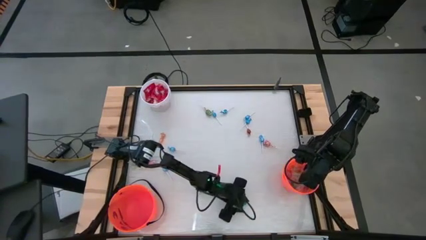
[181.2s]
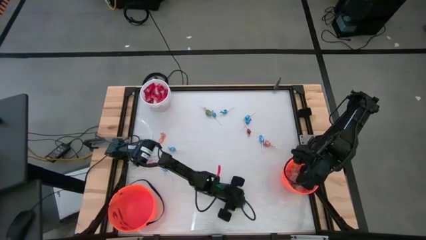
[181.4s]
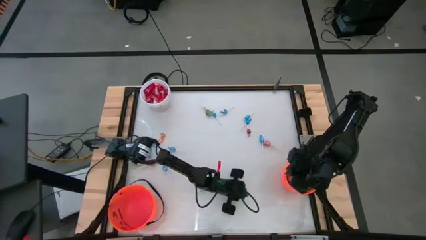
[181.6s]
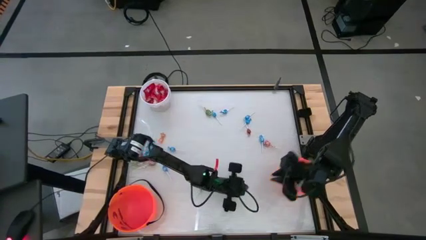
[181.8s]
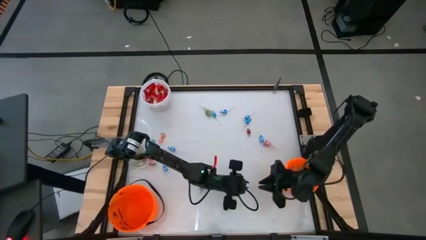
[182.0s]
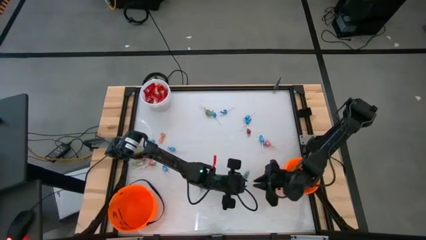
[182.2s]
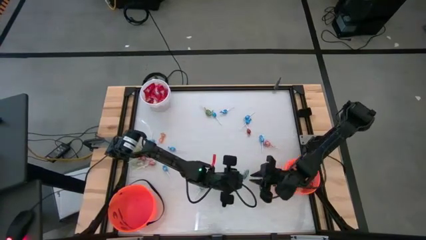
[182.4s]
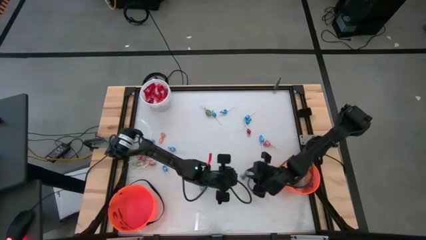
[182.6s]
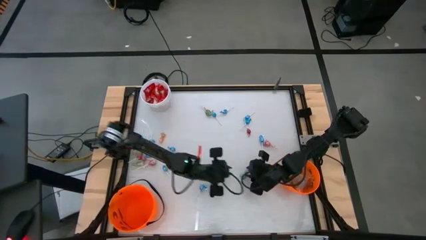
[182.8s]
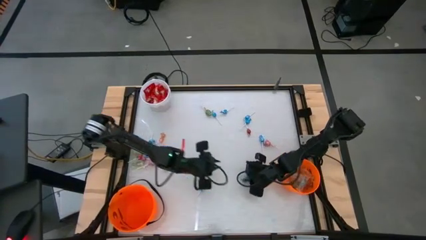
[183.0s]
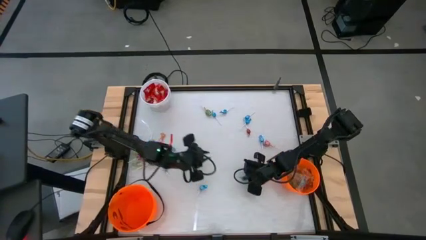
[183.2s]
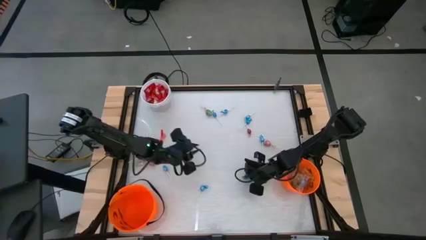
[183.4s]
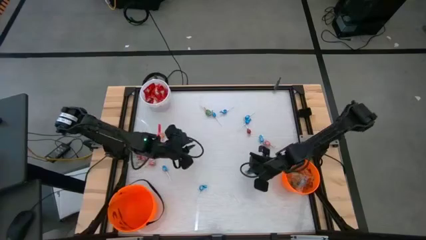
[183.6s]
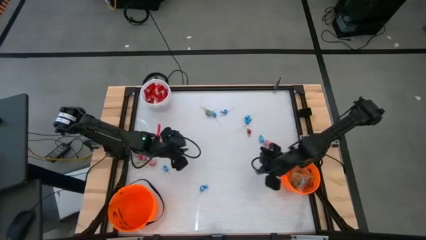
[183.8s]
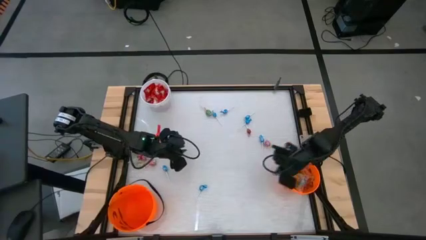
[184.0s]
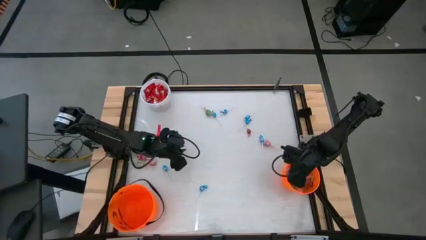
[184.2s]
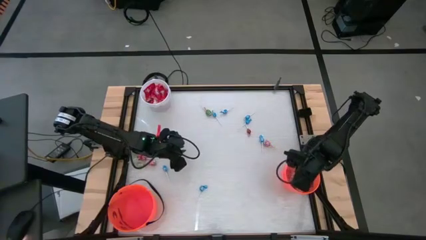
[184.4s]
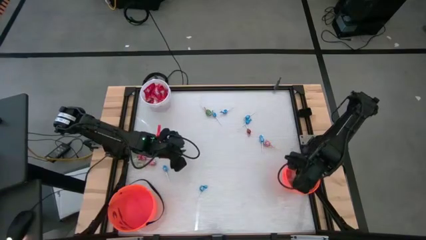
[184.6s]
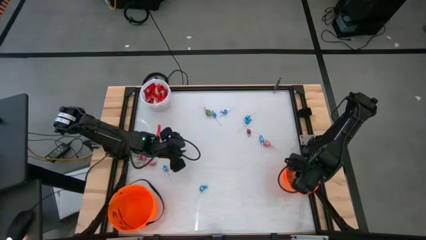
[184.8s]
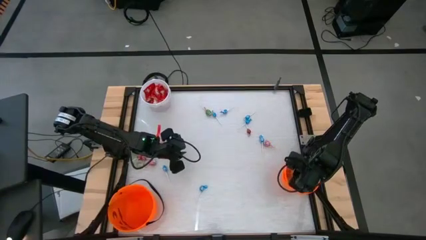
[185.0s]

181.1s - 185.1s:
Task: Sort candy by brand, put in halloween buckets
Put the blue candy into the right orange bucket

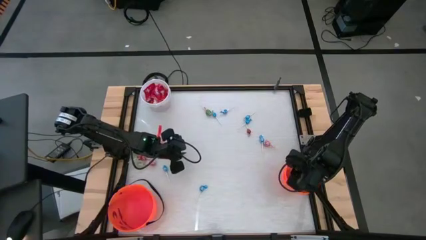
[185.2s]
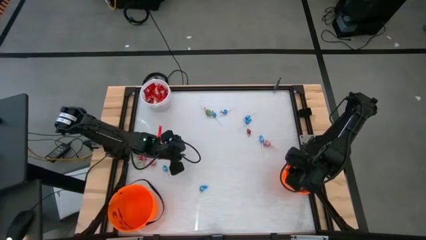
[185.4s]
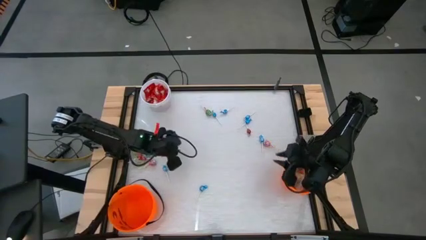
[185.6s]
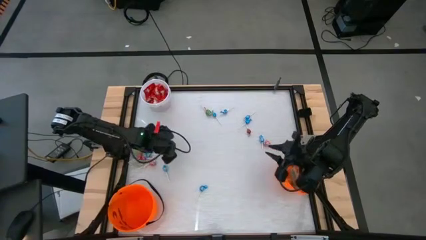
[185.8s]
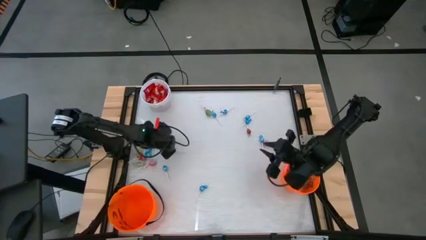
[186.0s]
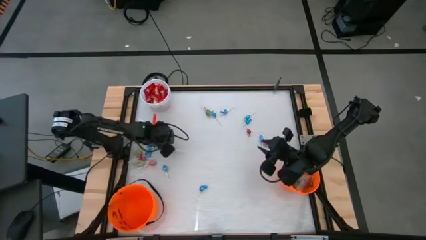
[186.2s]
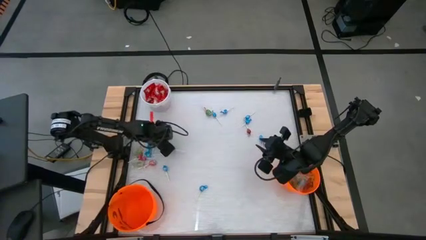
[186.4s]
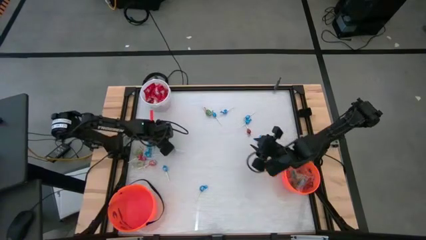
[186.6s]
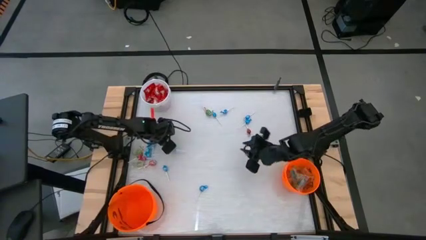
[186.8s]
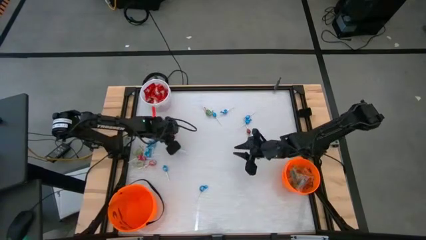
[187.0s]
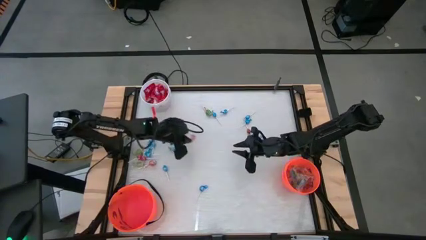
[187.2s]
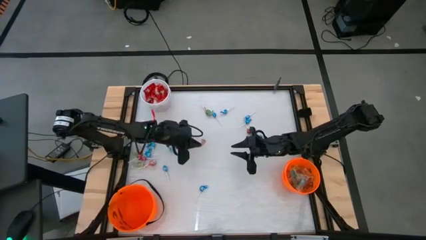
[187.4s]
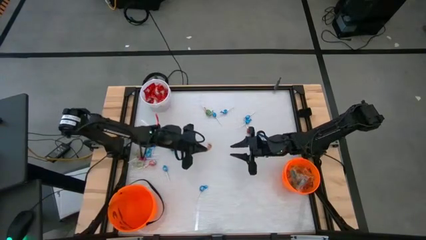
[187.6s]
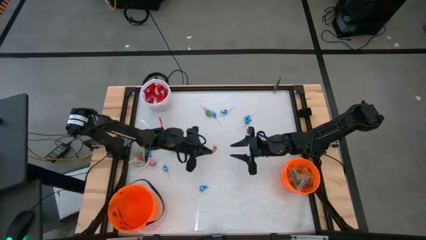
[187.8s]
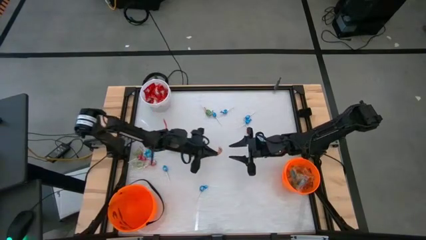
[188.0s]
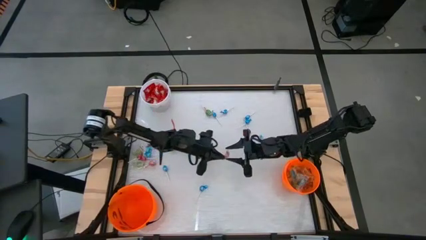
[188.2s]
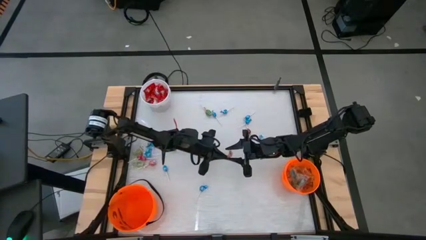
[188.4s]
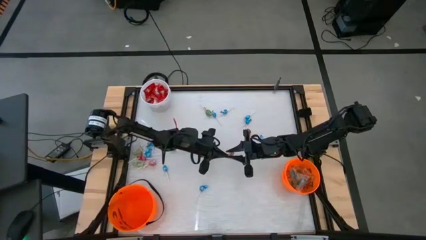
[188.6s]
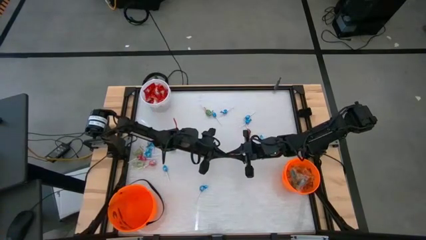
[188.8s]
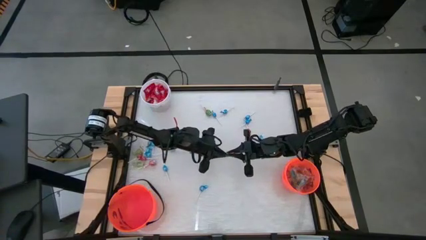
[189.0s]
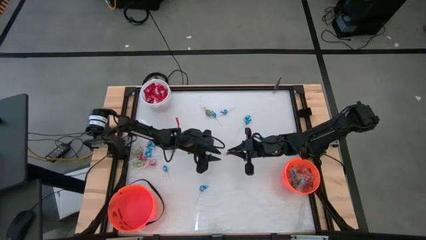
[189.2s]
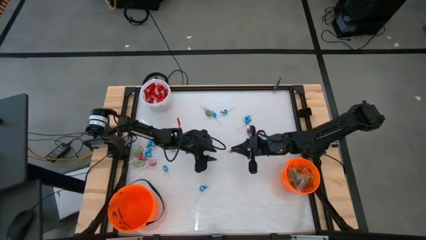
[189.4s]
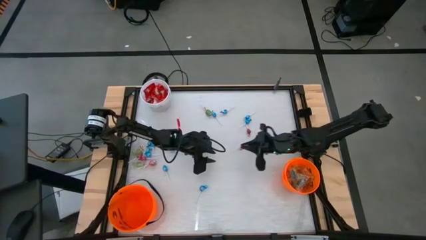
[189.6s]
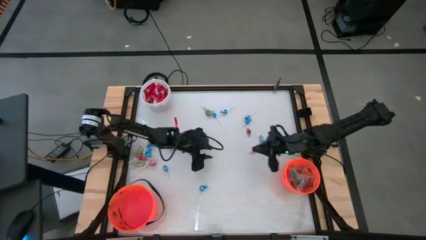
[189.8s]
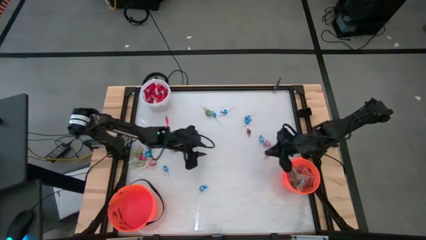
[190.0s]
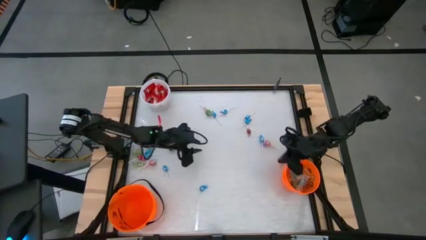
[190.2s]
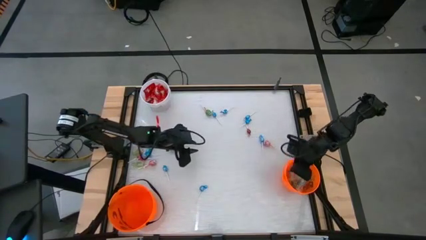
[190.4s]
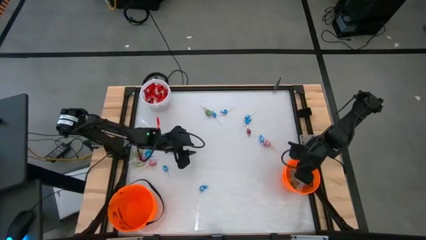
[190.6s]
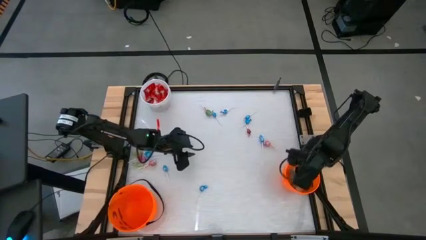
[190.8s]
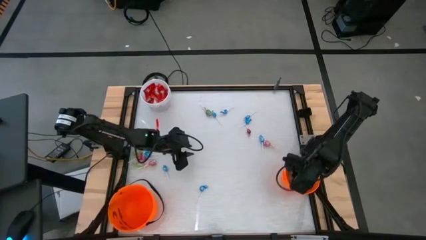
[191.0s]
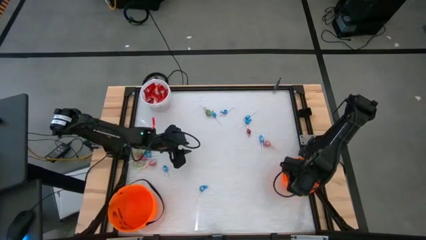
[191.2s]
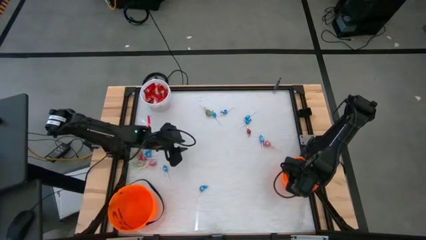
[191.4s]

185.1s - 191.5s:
Put the orange candy into the right orange bucket

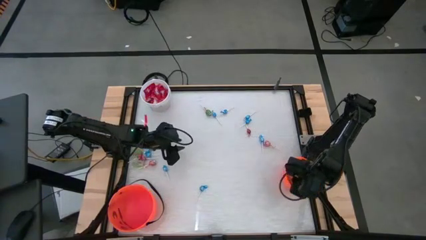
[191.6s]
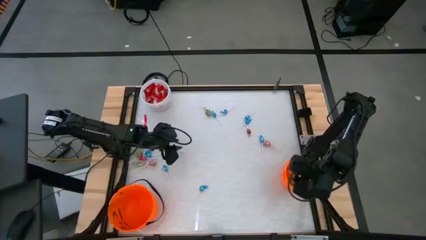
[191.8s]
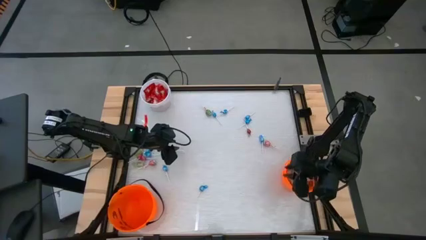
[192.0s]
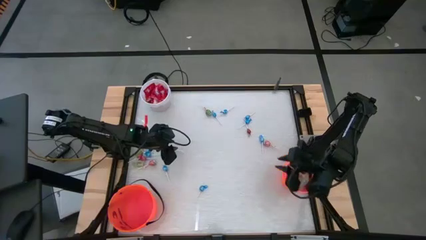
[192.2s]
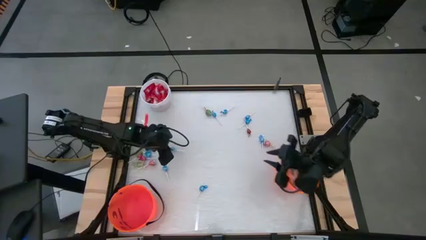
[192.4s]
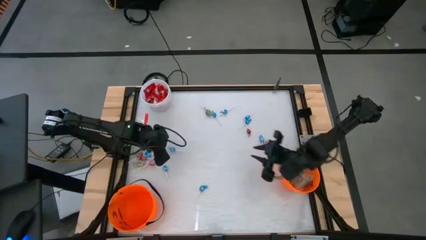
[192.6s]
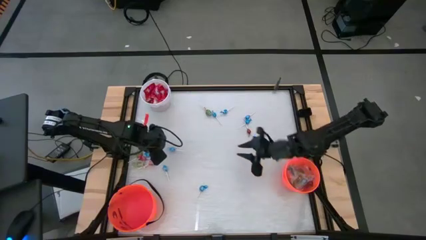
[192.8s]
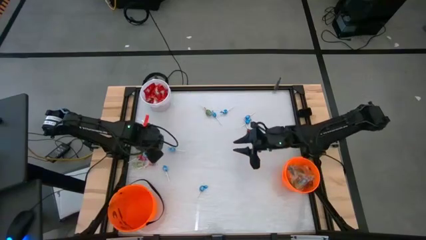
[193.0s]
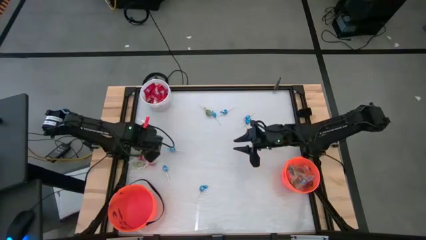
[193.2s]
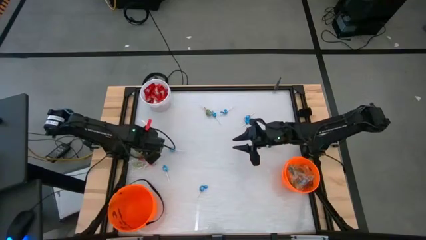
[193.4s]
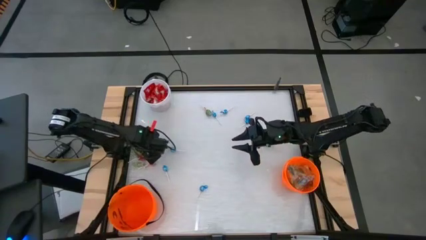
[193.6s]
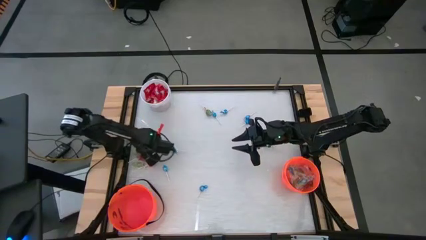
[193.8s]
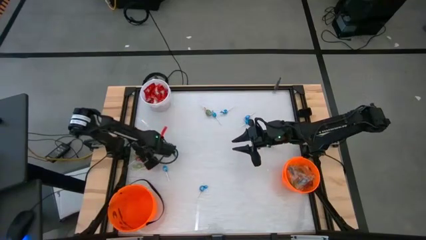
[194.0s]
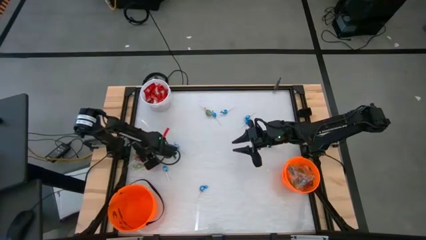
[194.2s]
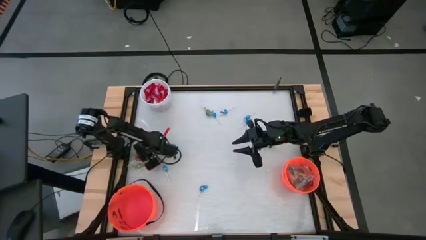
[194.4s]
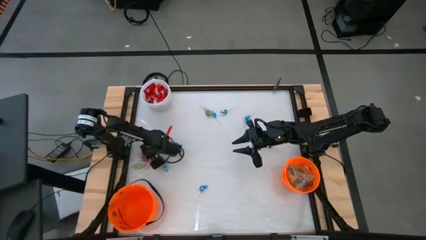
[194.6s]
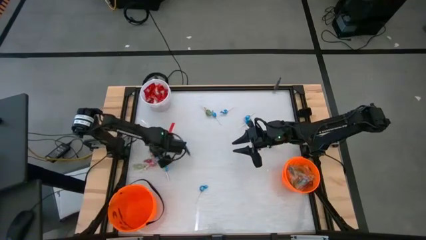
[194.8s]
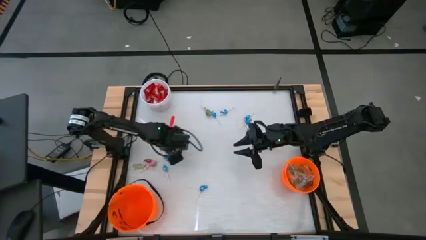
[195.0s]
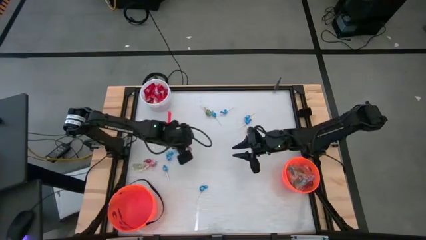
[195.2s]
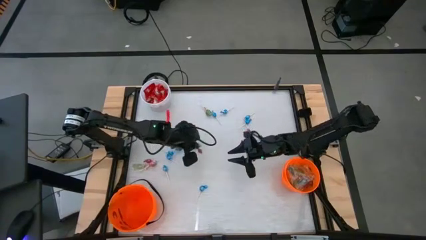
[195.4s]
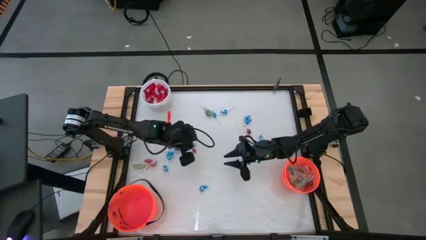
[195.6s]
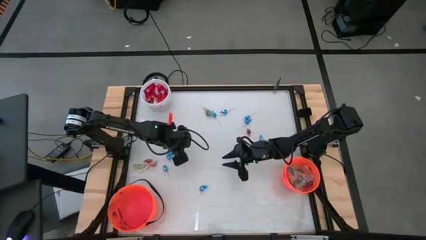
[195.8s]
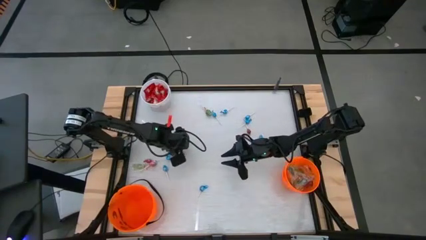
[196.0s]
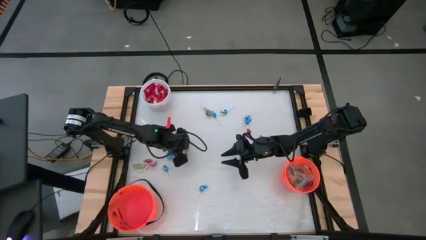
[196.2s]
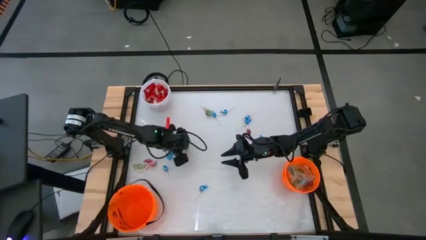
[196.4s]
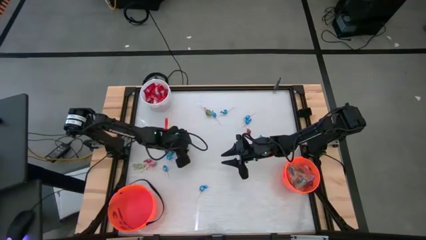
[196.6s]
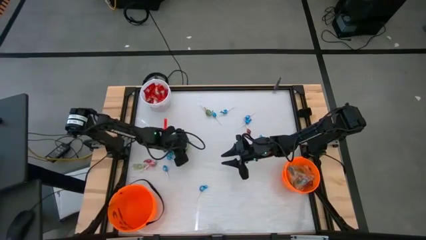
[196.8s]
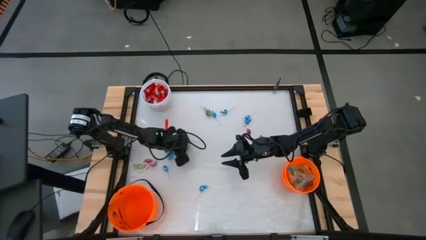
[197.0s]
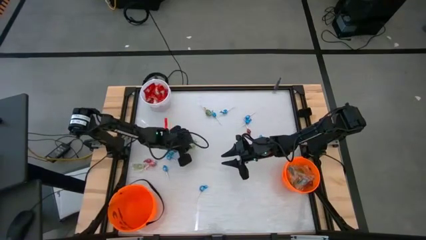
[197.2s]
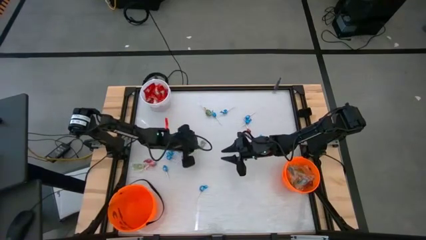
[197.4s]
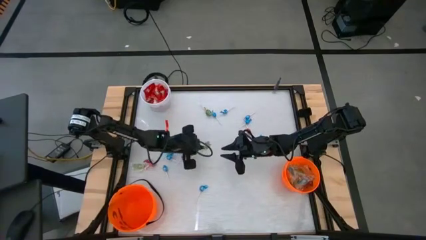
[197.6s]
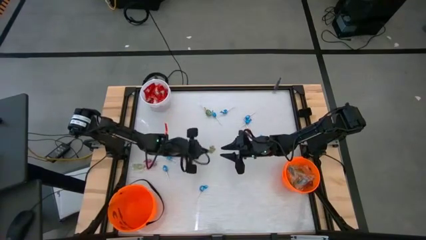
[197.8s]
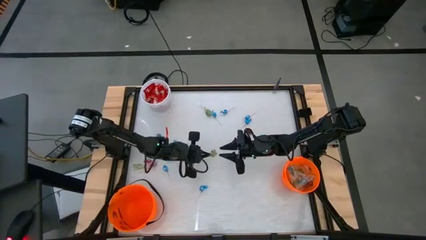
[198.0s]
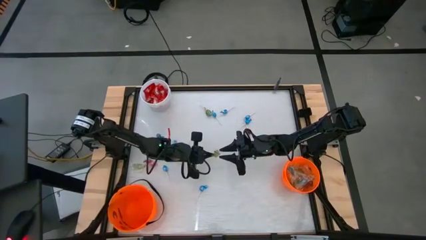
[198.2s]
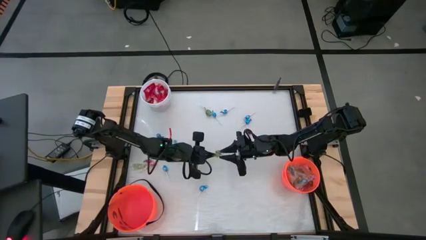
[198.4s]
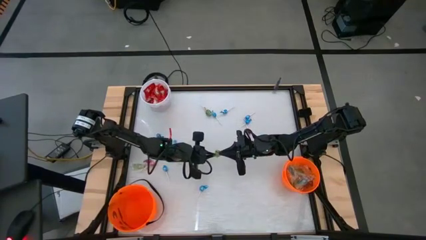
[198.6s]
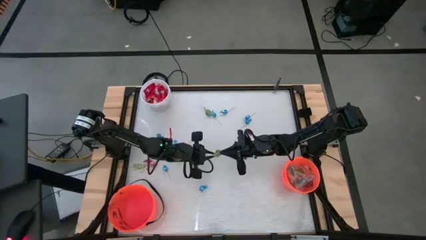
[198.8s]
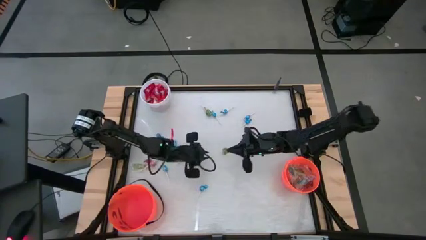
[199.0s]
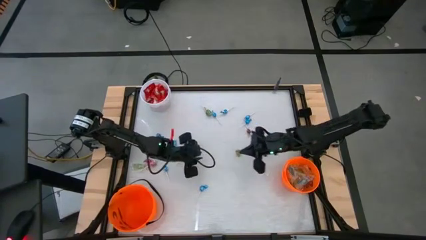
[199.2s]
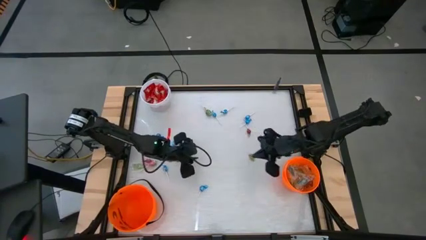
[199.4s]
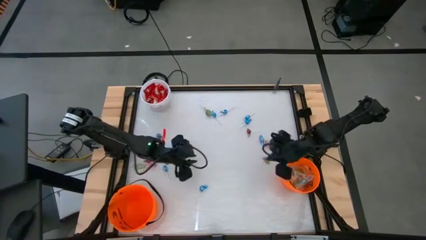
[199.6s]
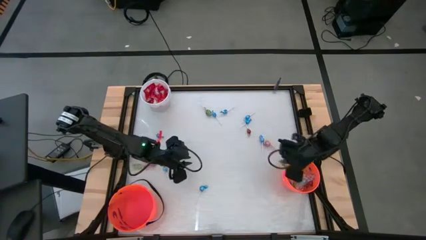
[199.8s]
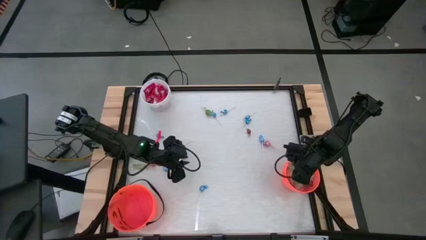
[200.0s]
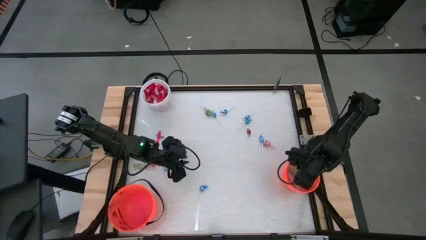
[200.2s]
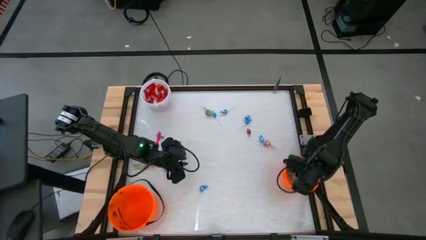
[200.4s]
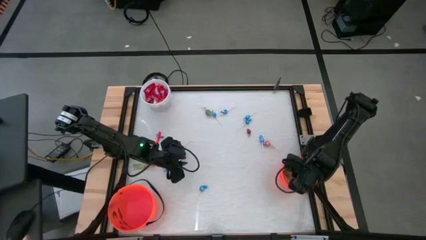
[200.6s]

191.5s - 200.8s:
Put the top left green candy into the right orange bucket
